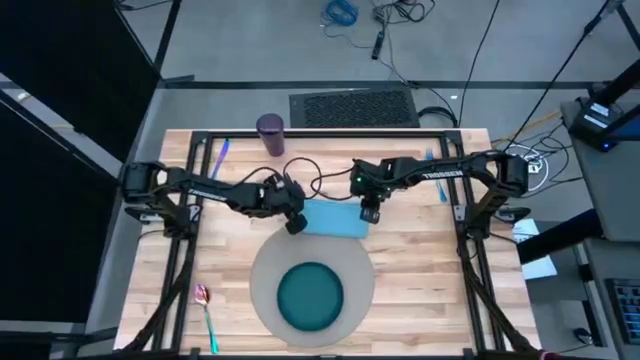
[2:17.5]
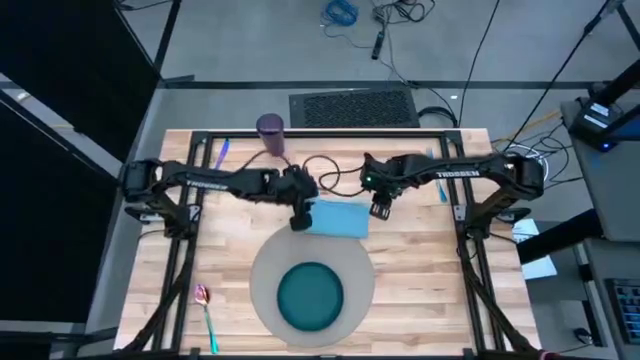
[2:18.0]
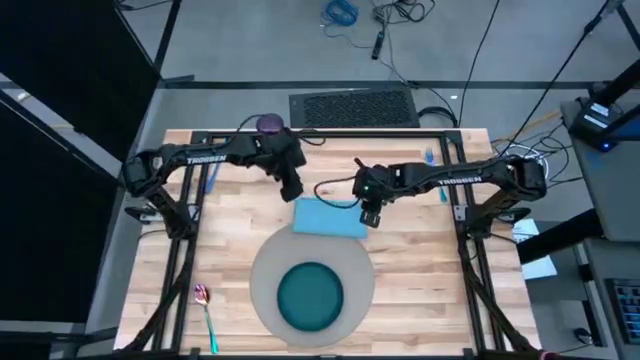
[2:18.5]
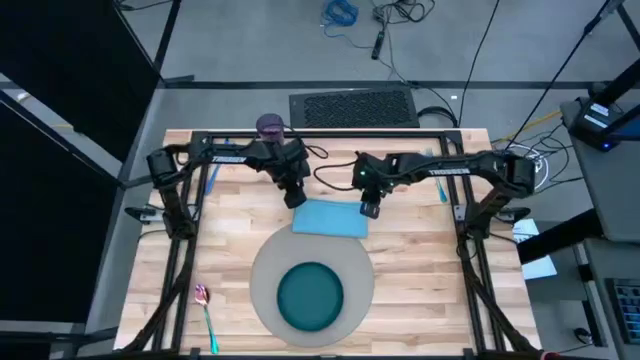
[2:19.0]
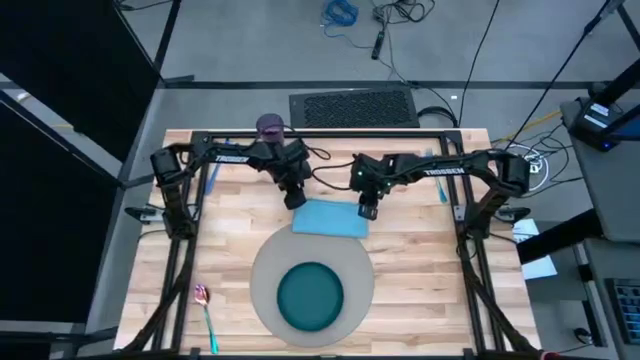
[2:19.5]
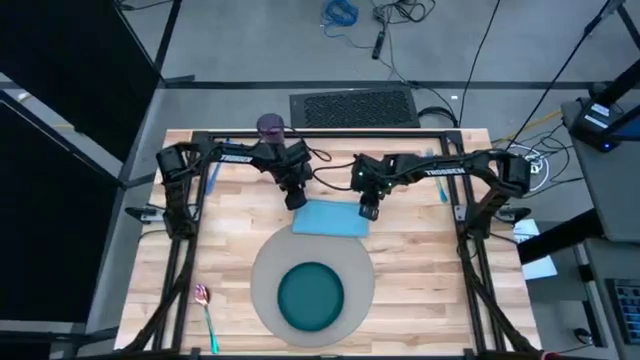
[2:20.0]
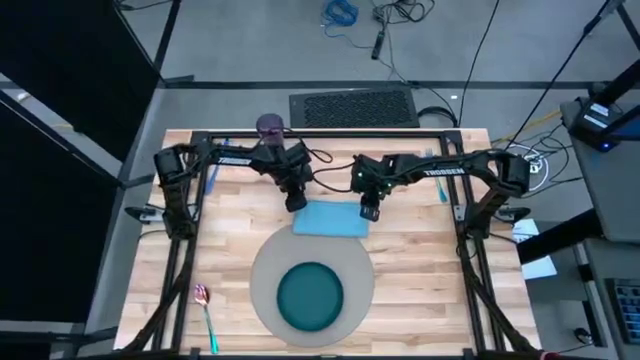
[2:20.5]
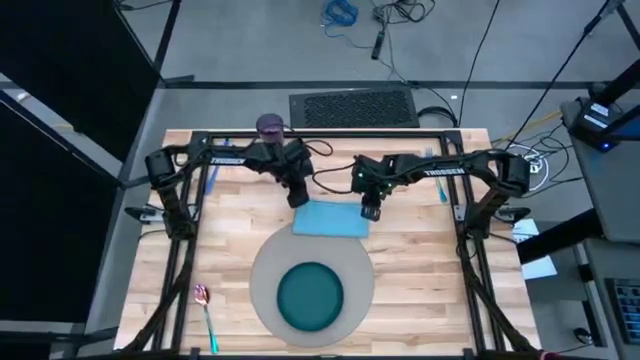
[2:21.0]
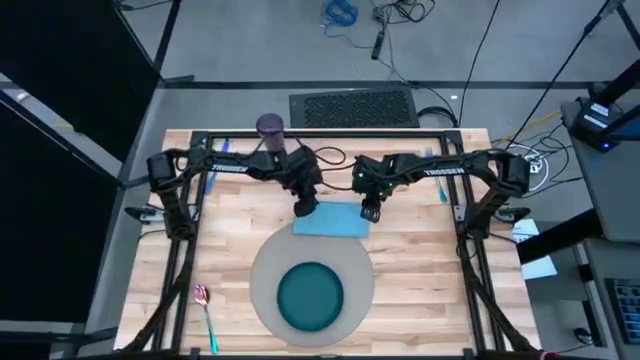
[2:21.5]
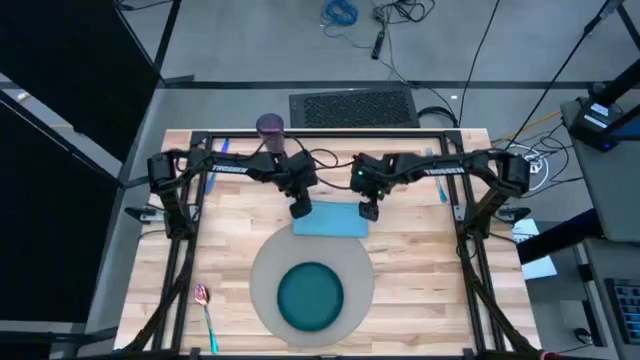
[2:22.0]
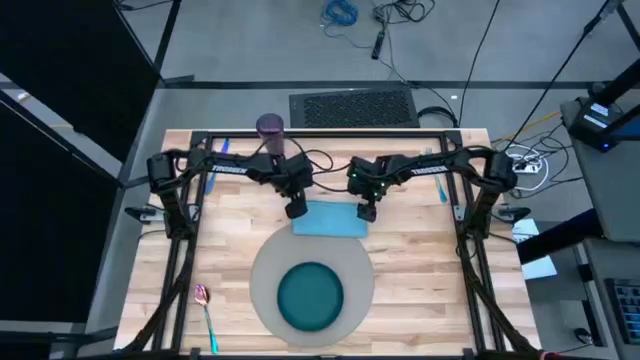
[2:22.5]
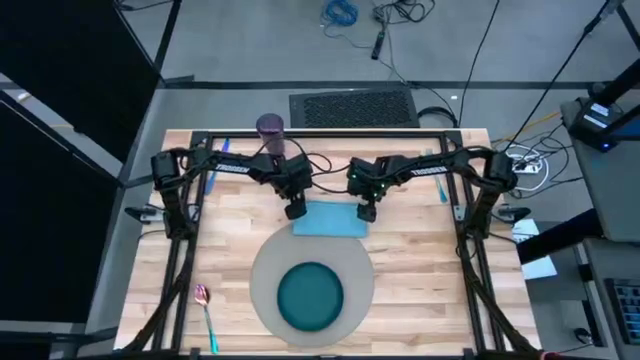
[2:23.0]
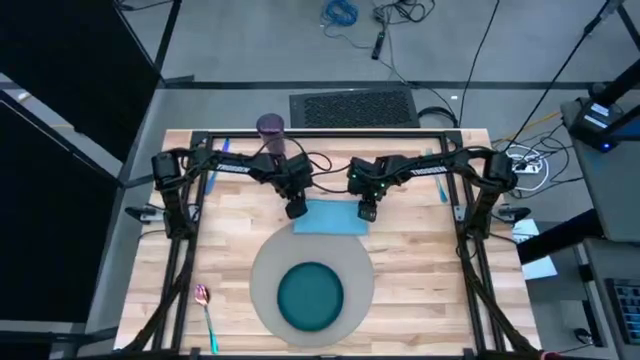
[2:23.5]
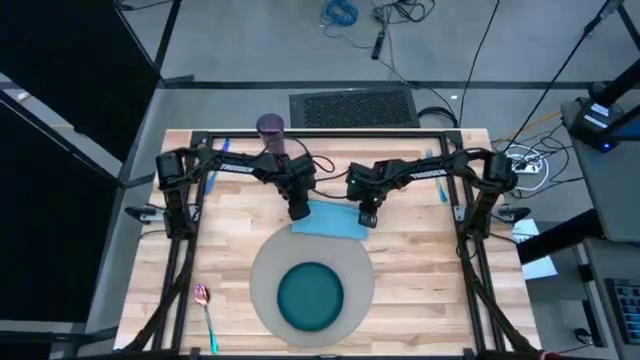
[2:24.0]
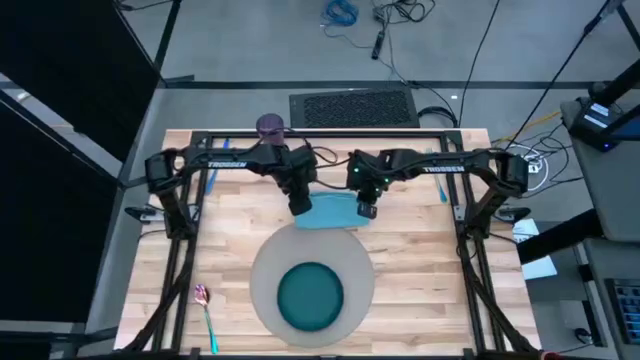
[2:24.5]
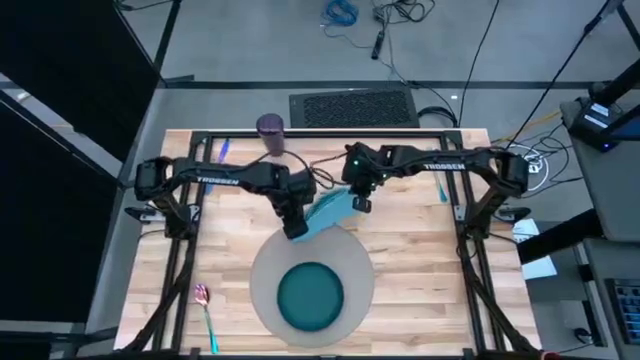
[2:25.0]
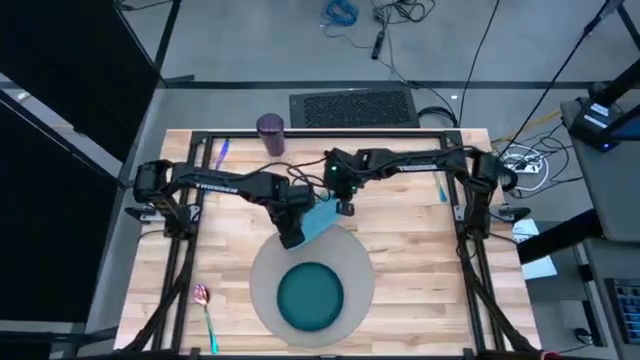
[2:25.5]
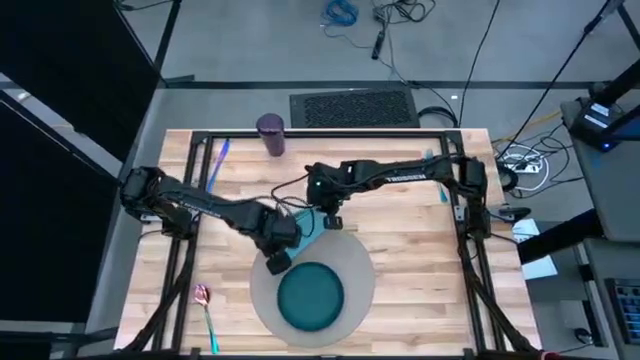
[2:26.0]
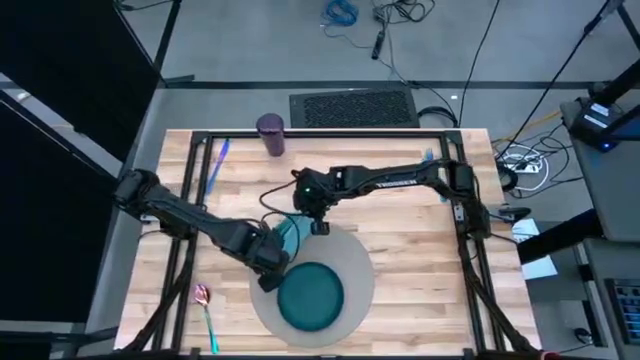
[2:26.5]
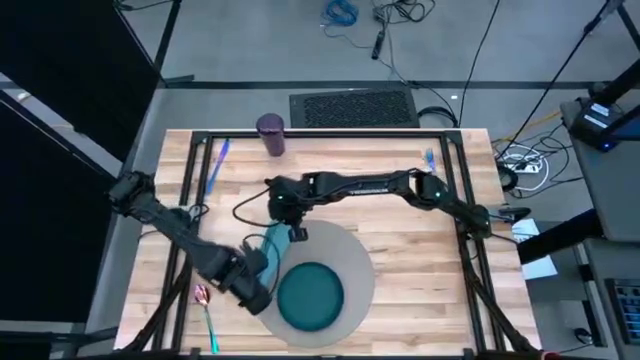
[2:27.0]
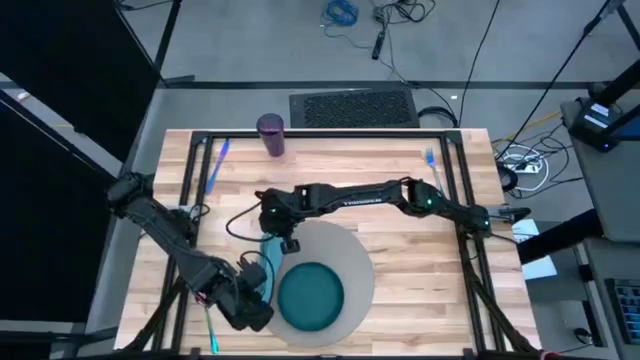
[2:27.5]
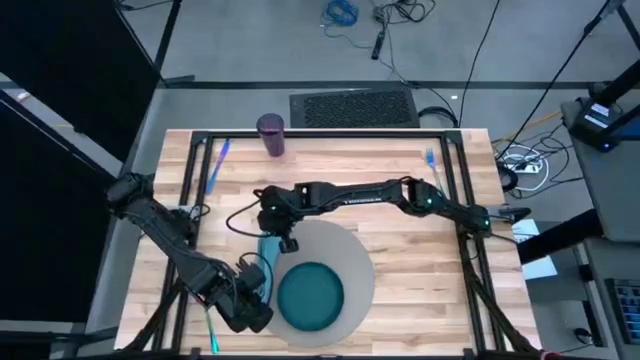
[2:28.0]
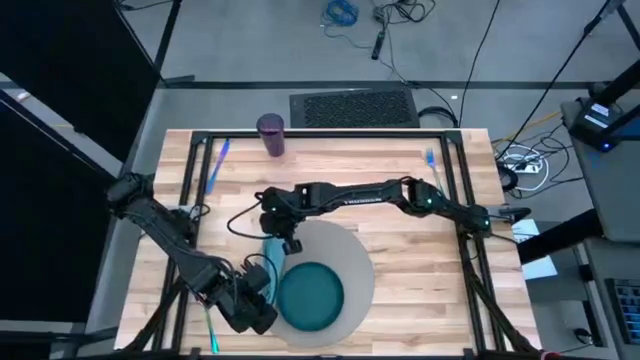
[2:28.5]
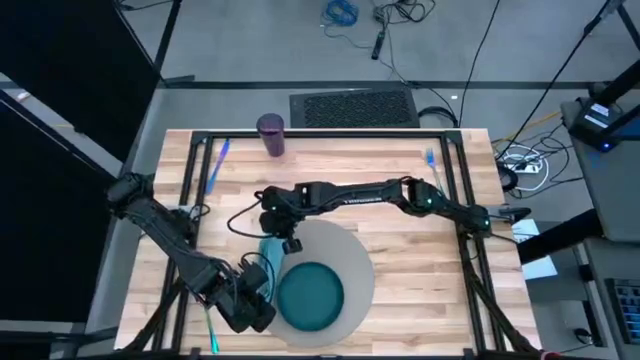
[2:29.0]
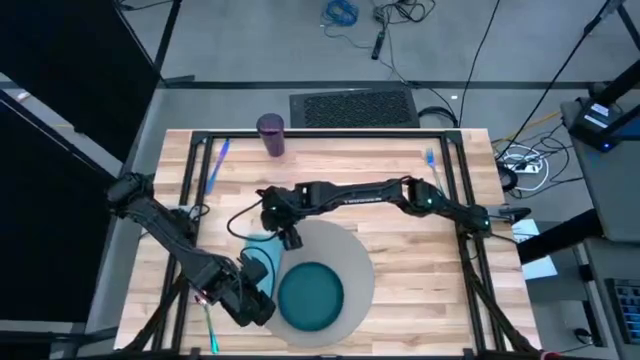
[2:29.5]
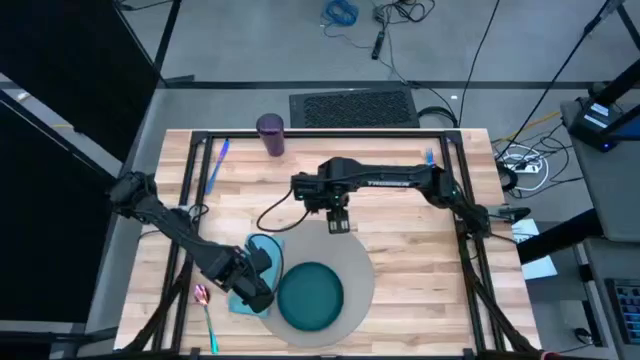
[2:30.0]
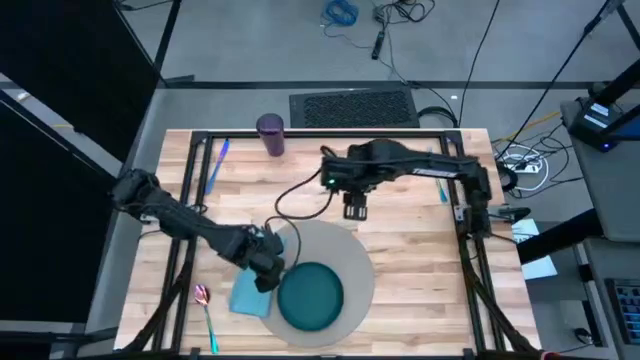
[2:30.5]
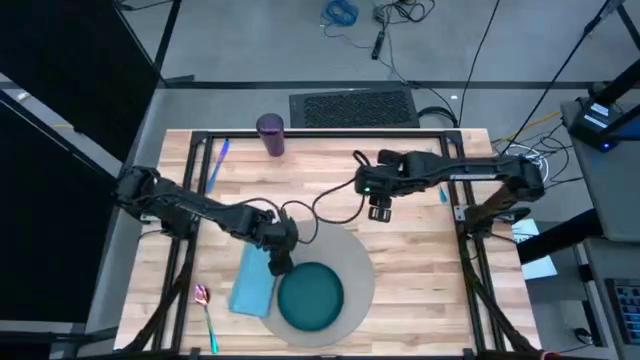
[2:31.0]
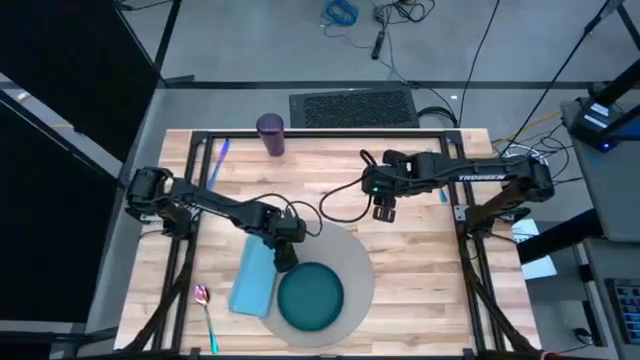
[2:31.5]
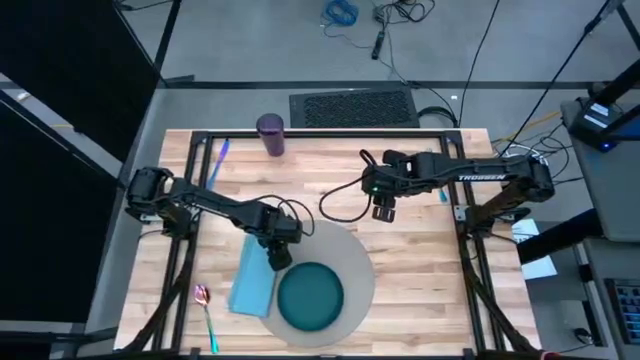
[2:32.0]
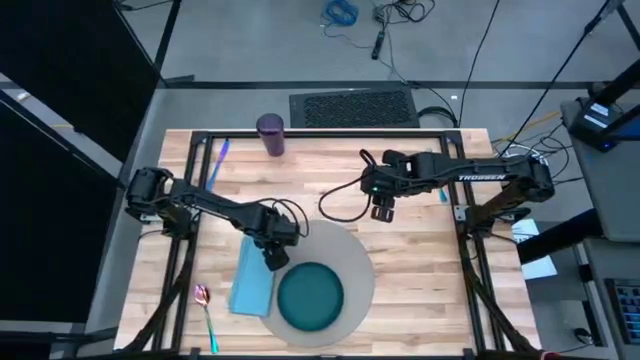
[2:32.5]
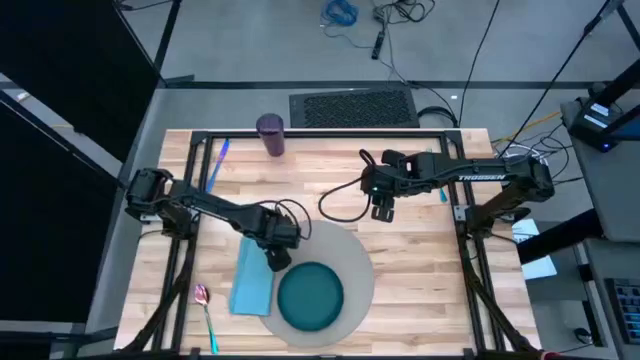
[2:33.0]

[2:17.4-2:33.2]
Task: Set table place
Move the blue table napkin to the left of the dark green plate on the gray placemat

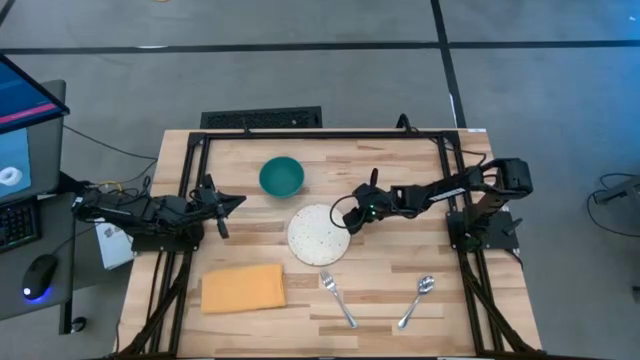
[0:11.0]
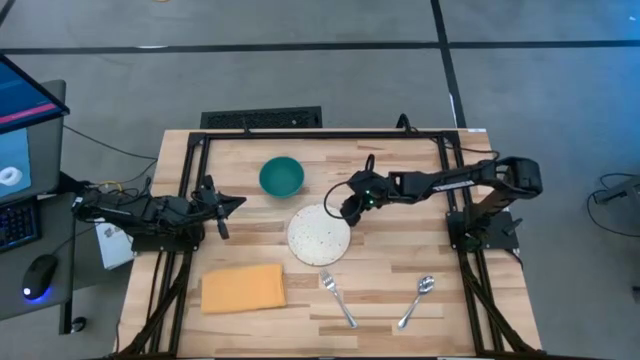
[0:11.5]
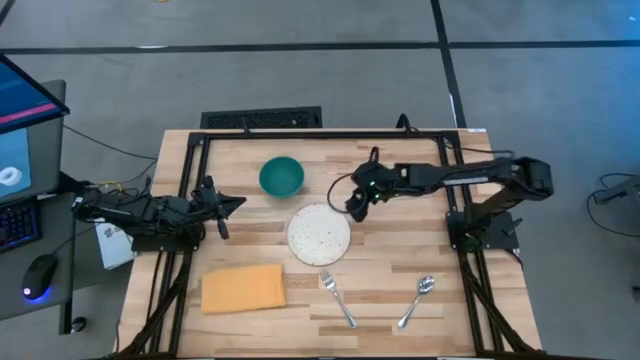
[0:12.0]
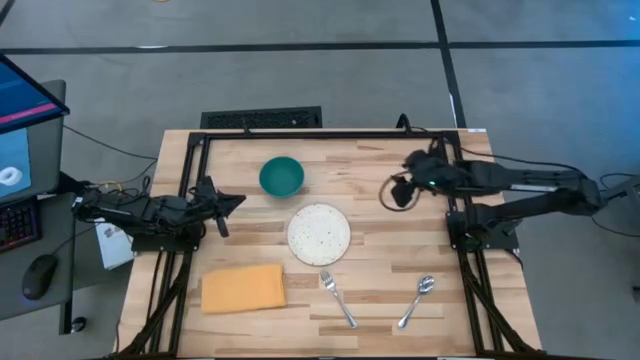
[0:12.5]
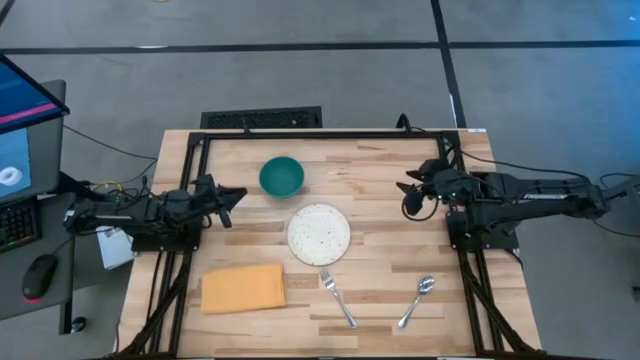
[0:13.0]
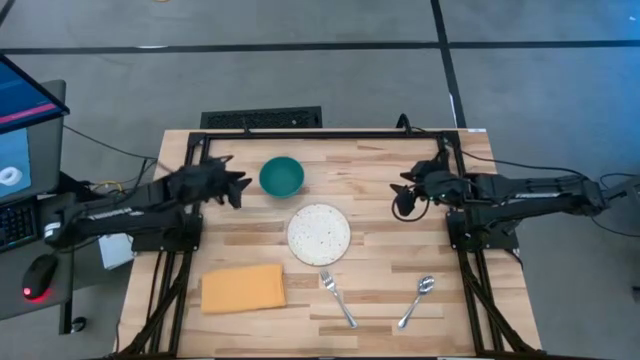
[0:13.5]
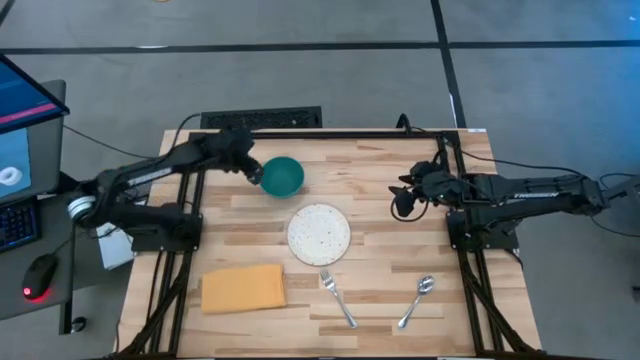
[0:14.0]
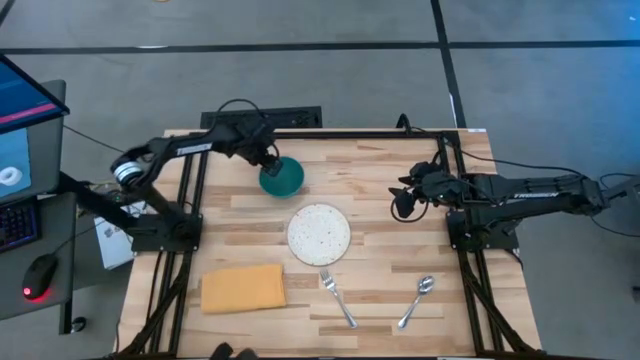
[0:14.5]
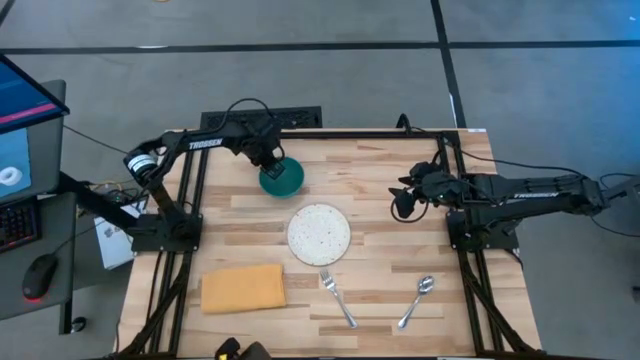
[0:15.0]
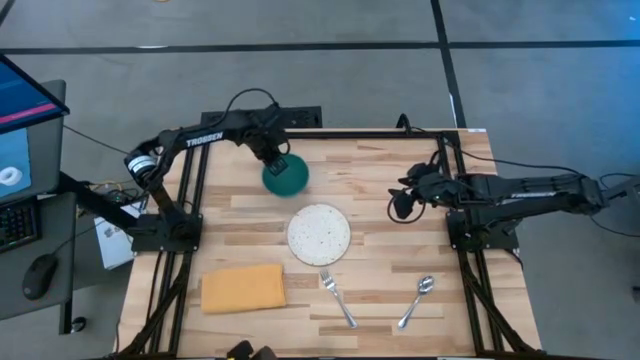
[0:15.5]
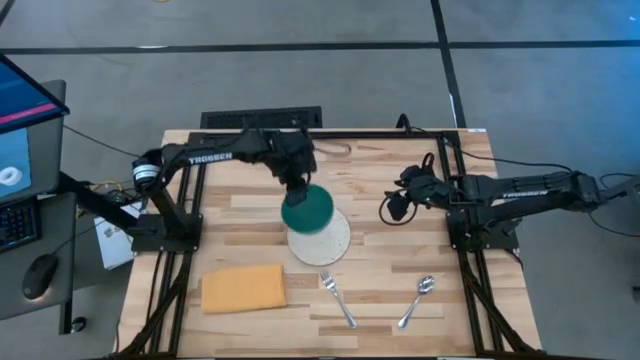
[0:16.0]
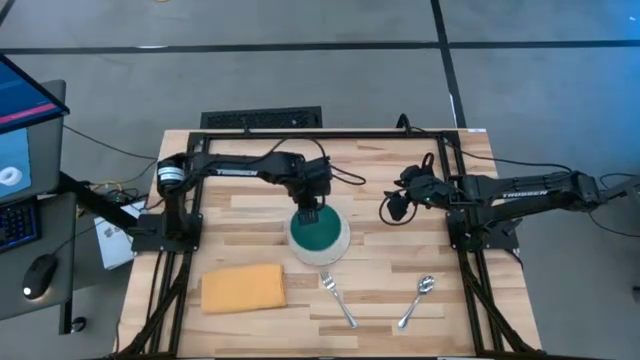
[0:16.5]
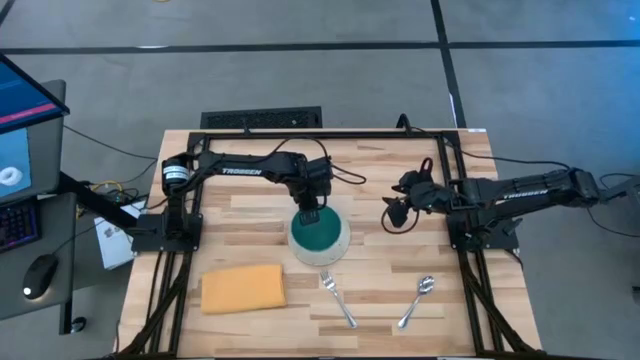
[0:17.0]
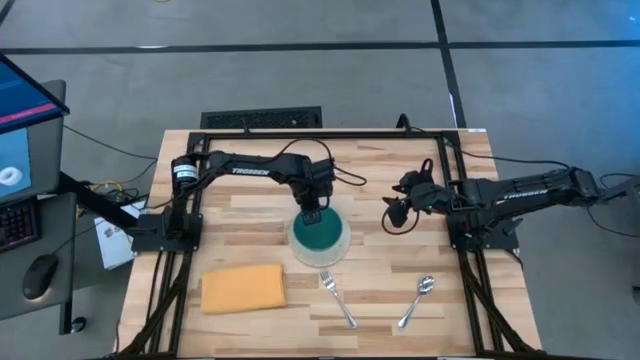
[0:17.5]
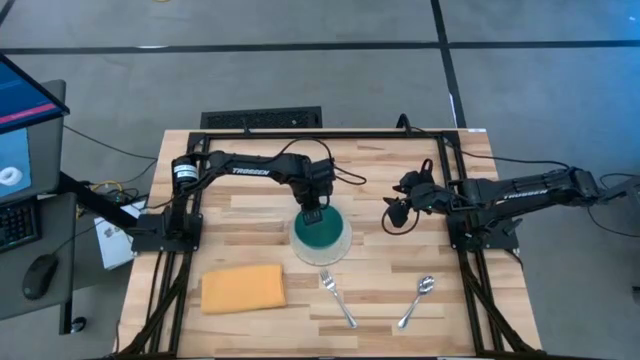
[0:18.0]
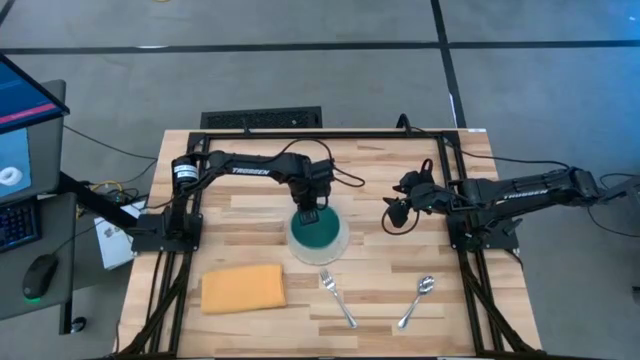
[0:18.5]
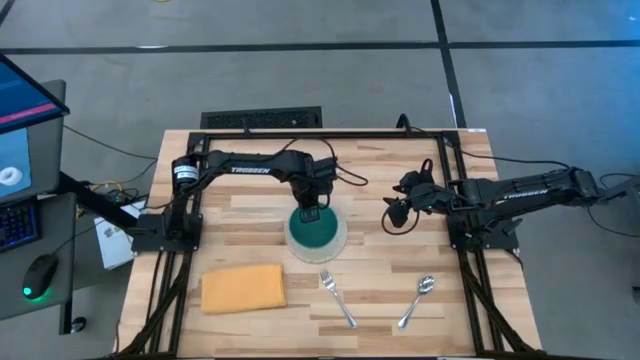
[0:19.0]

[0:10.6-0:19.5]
Task: Set table place
Put the bowl on the plate
